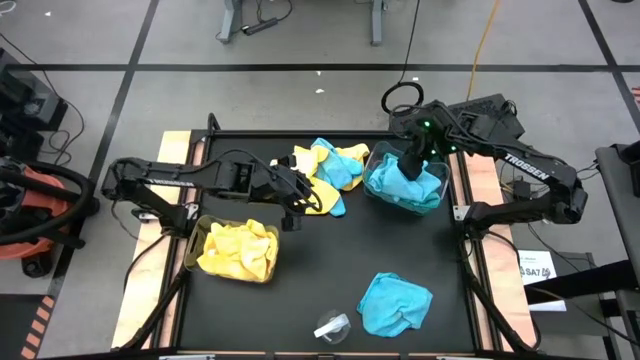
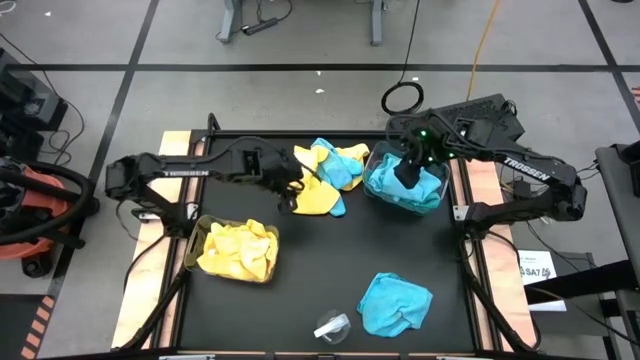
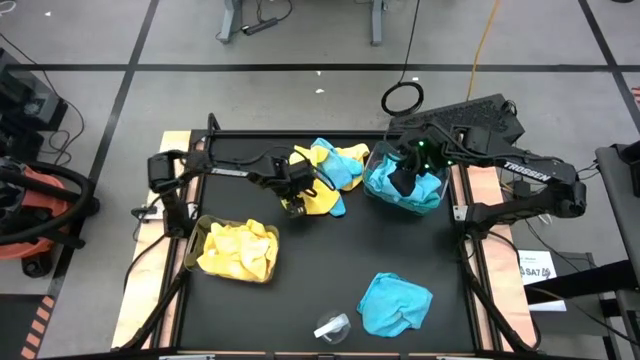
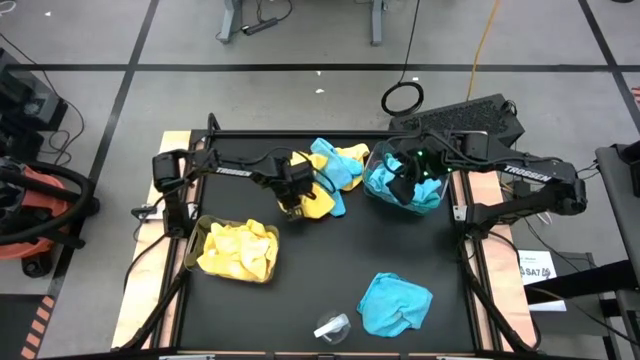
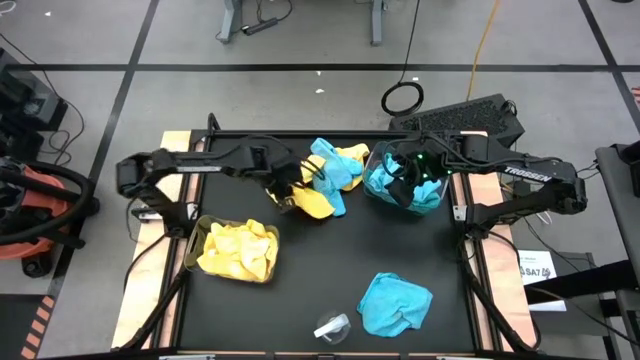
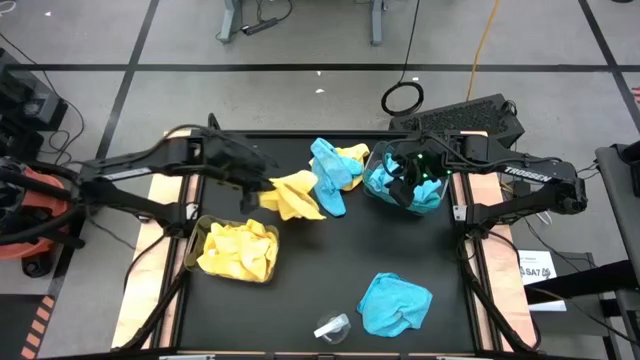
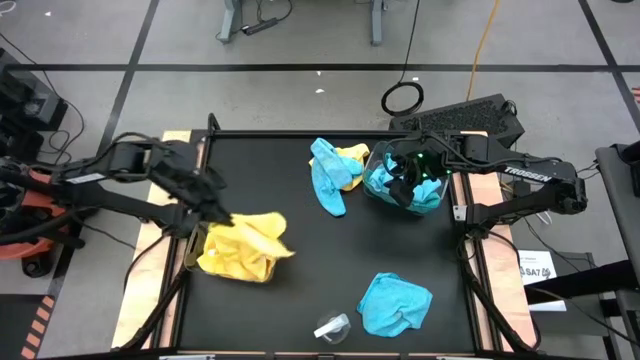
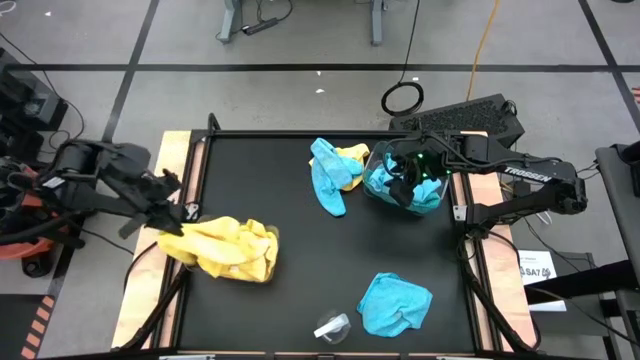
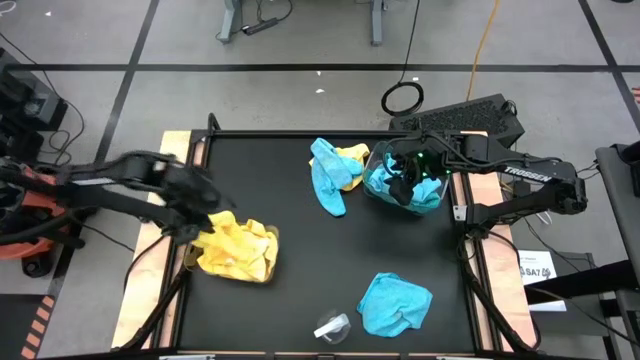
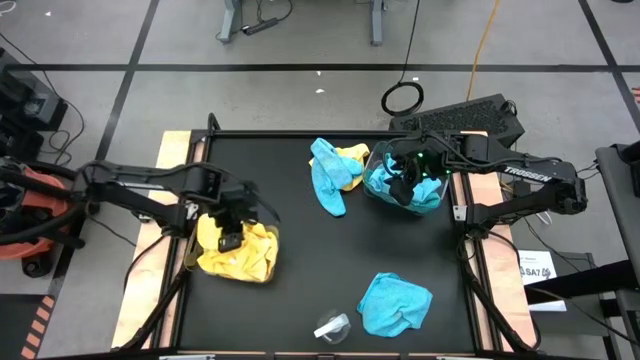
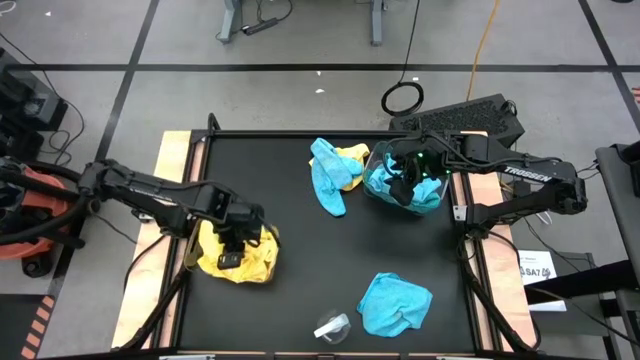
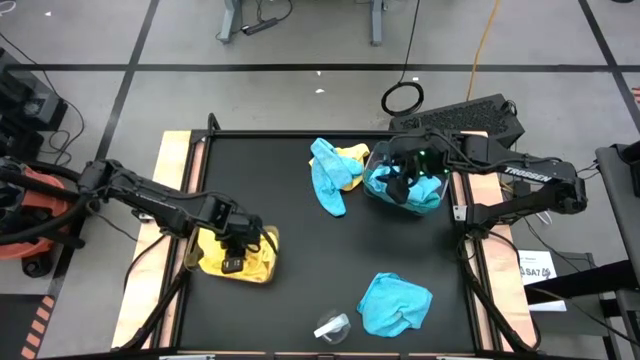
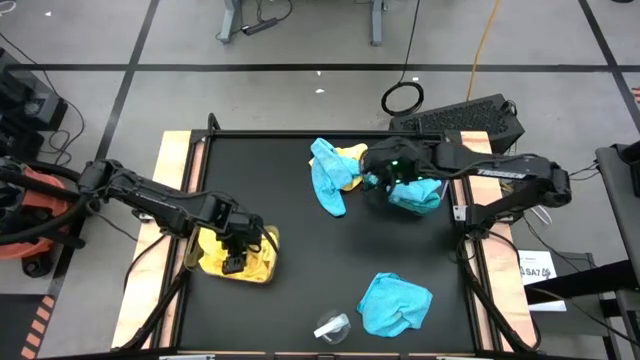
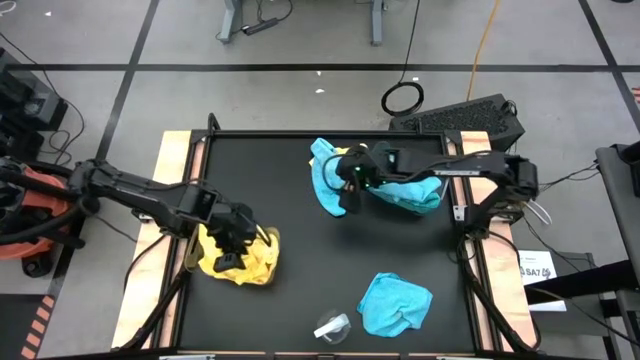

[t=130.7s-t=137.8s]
Task: Sort microfiber towel by color & place in baskets
Put the yellow microfiber towel into the bottom transparent bin

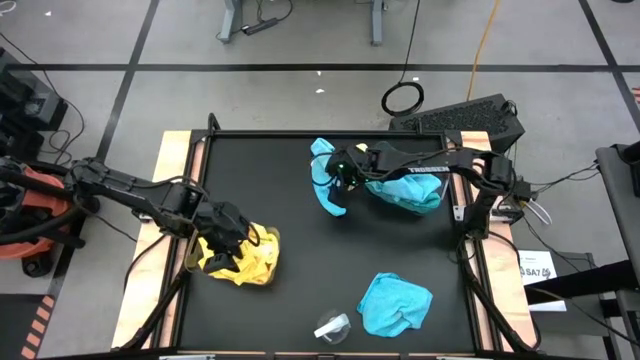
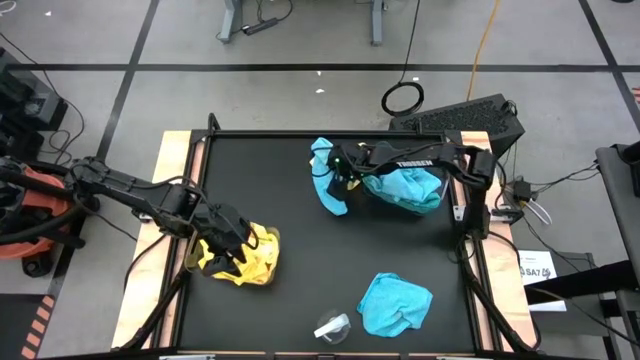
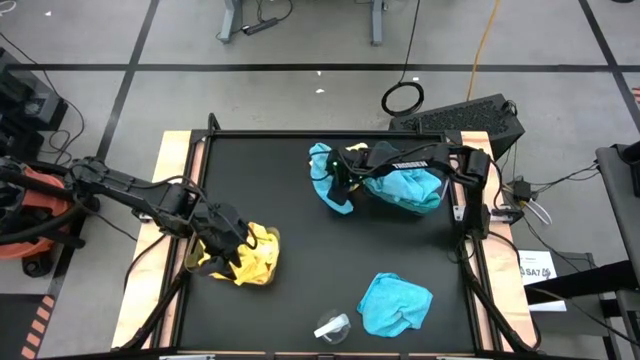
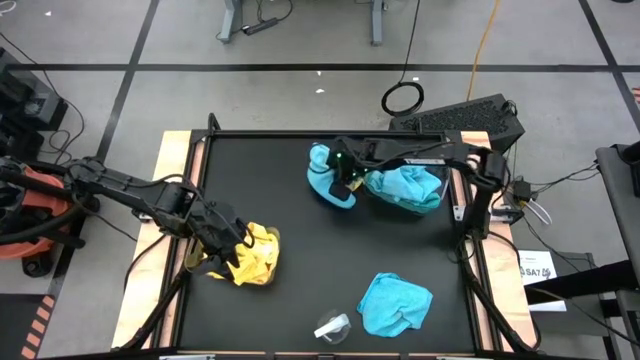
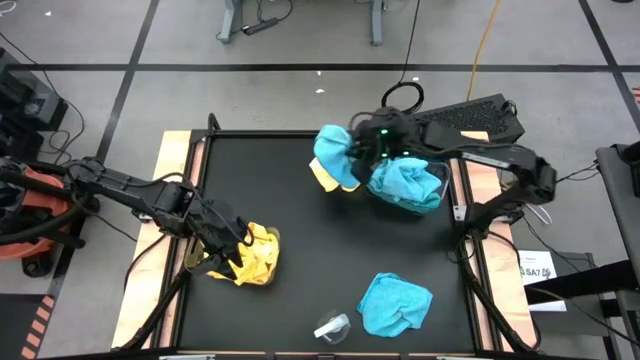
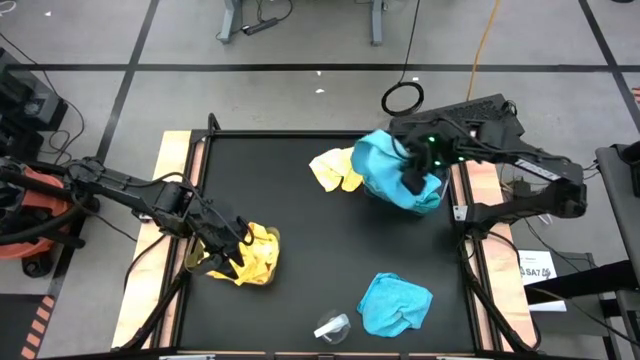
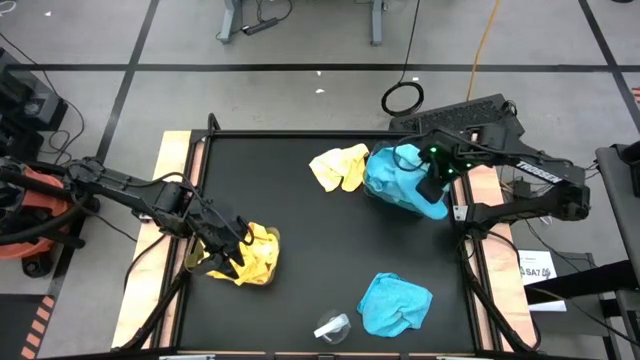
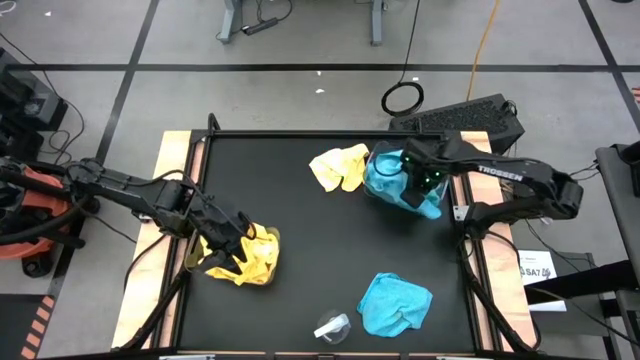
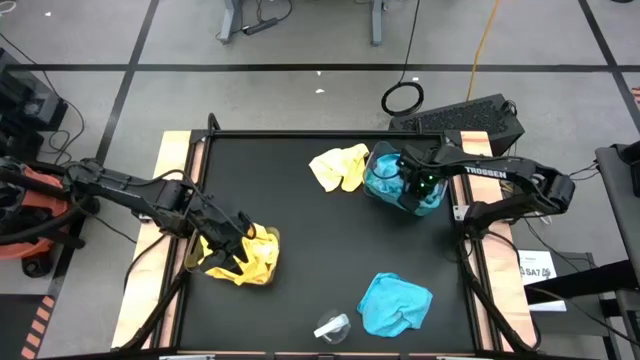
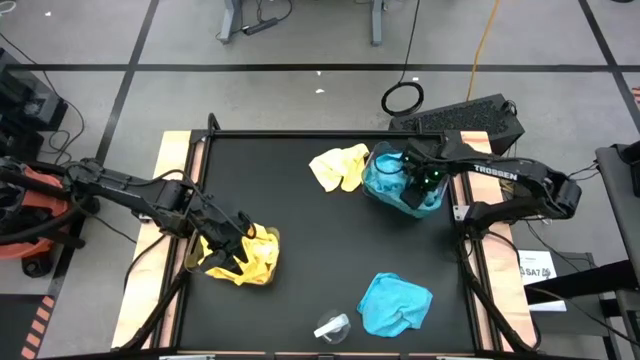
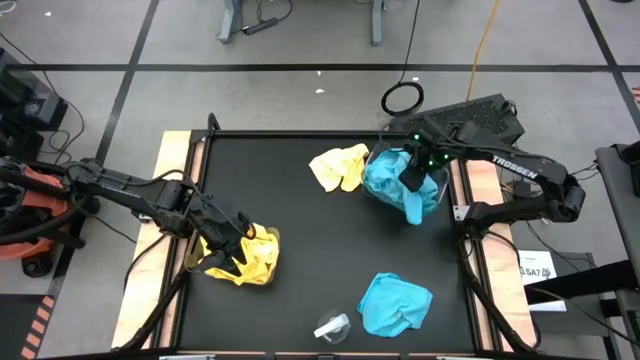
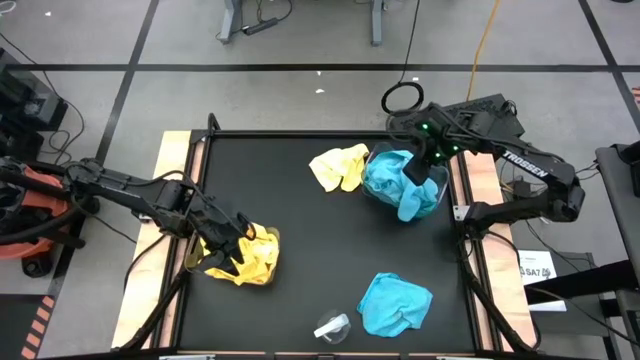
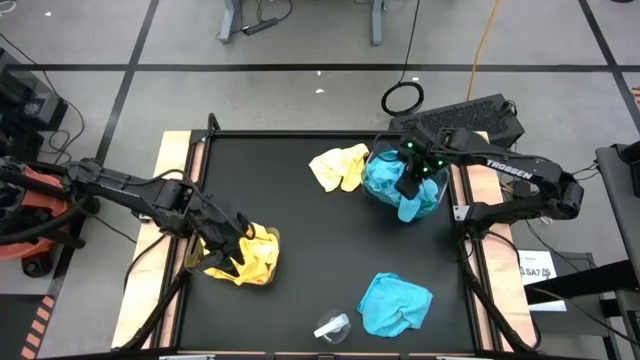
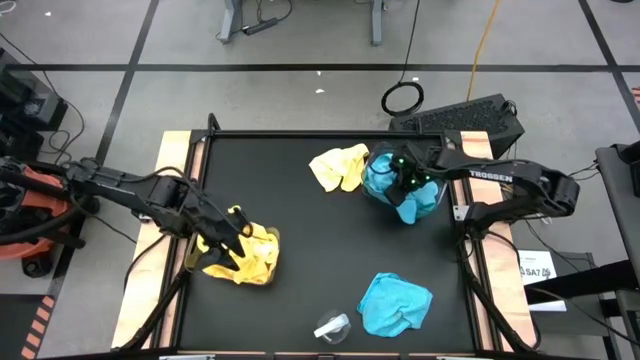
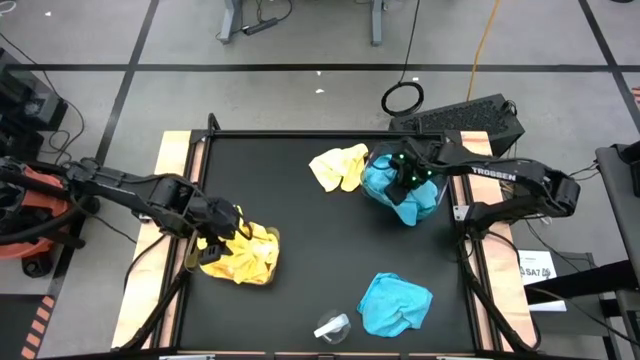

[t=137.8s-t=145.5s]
Put the blue microfiber towel into the top transparent bin

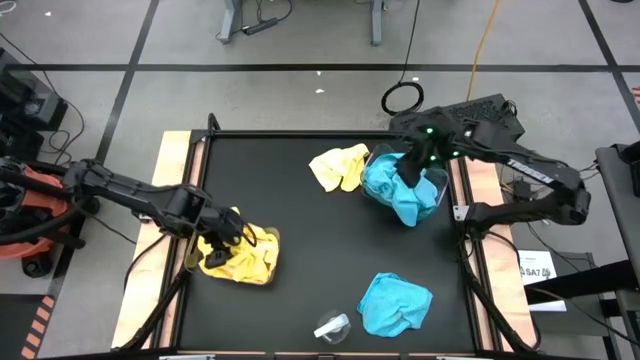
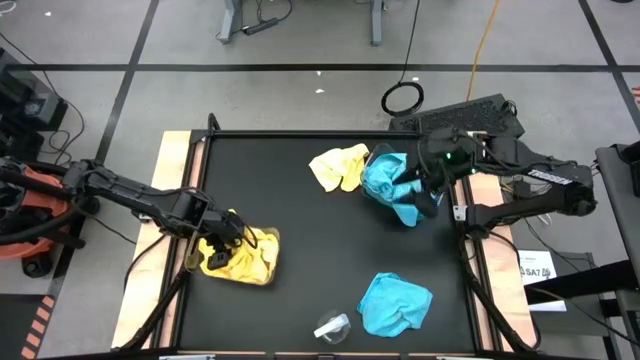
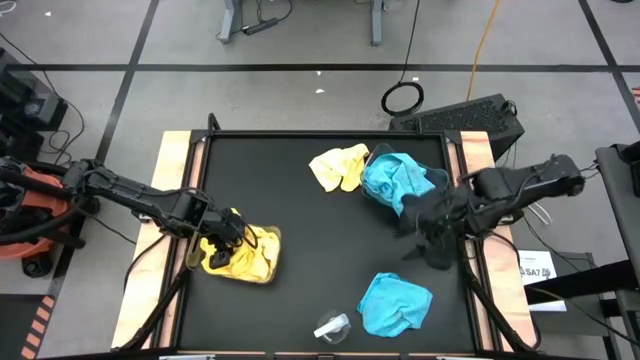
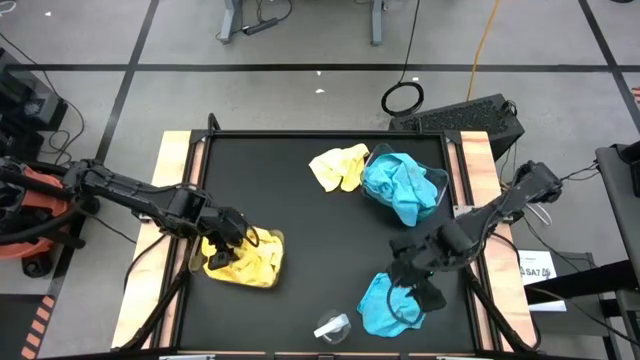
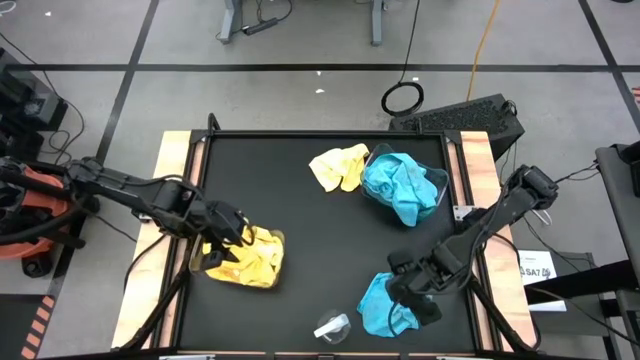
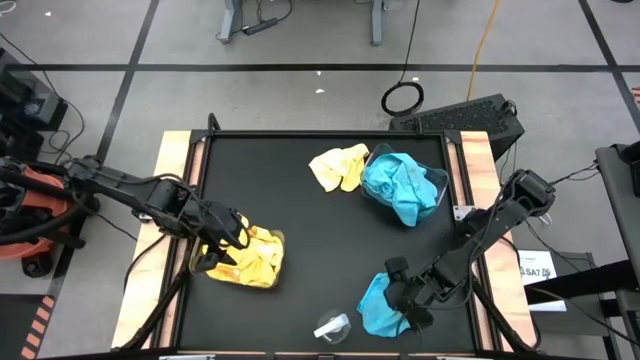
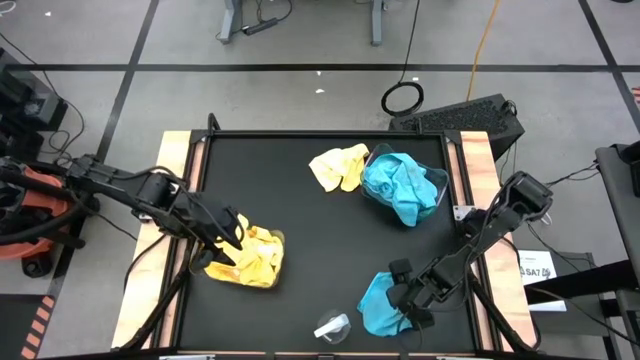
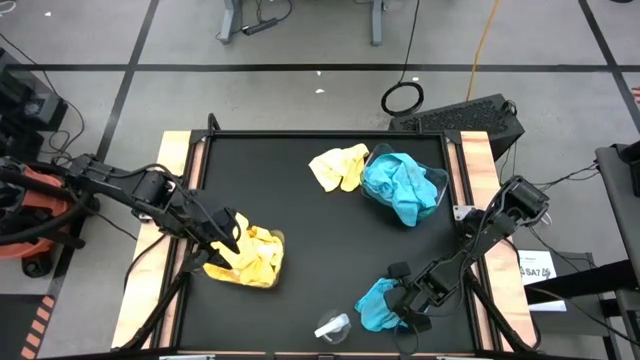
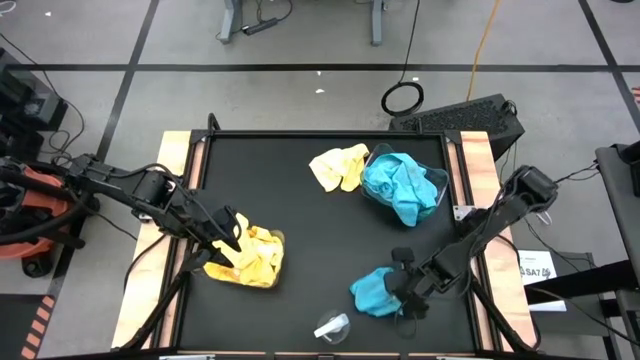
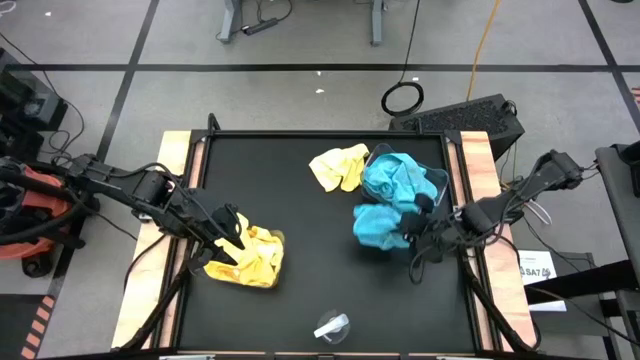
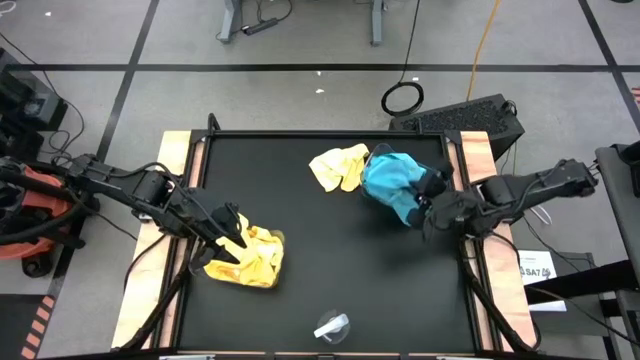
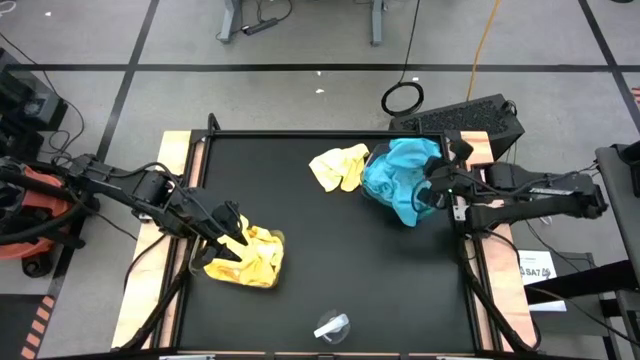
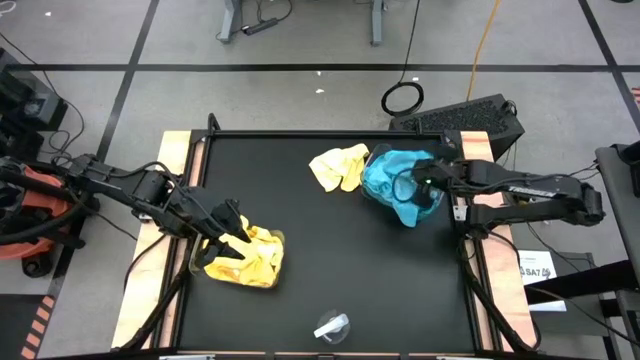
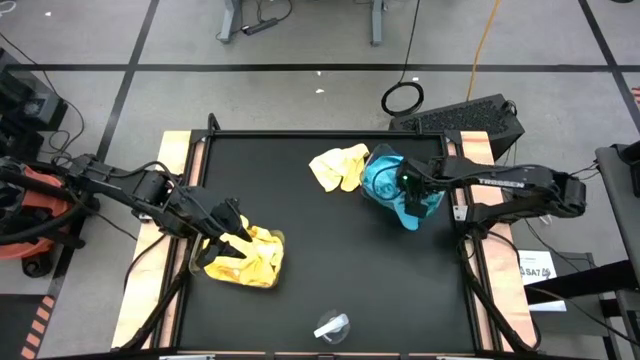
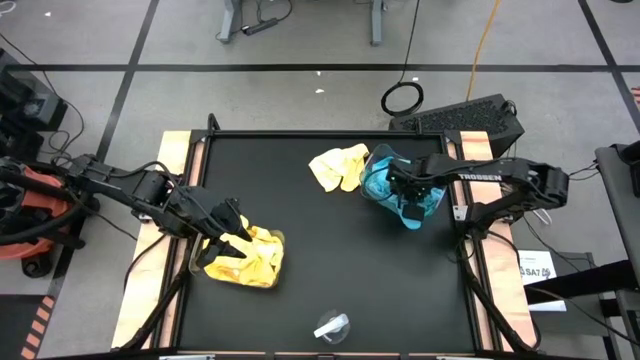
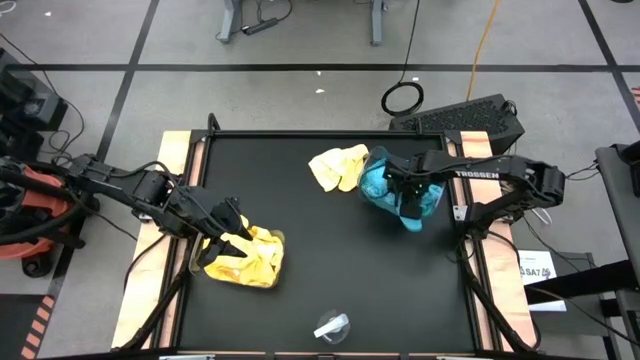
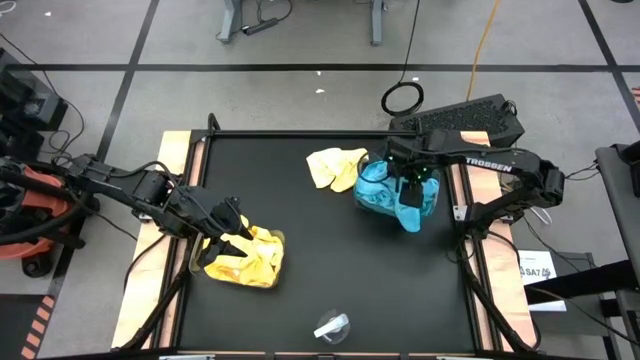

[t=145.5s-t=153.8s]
Put the blue microfiber towel into the top transparent bin
